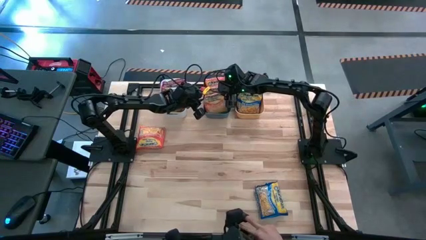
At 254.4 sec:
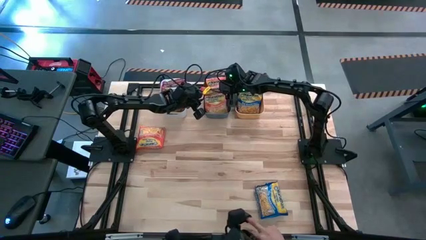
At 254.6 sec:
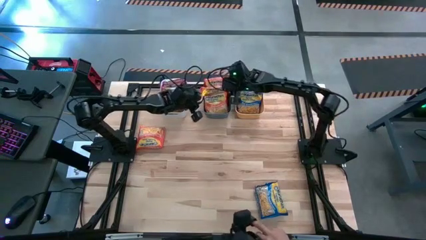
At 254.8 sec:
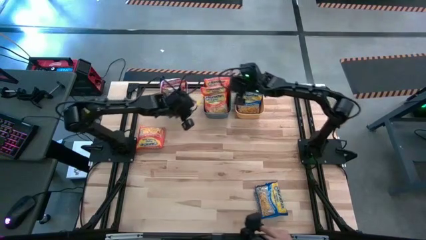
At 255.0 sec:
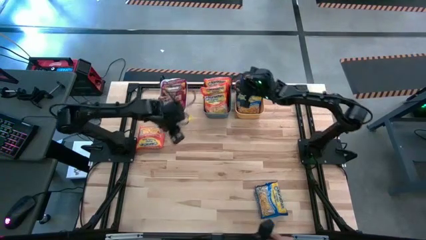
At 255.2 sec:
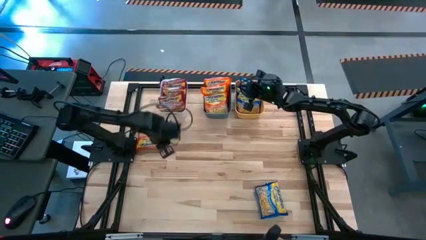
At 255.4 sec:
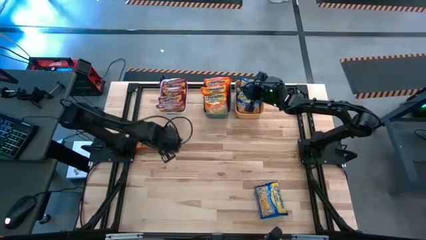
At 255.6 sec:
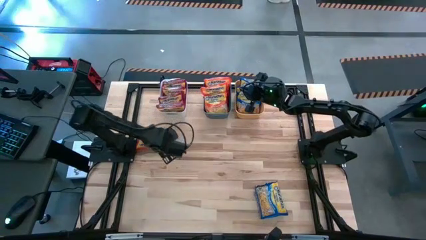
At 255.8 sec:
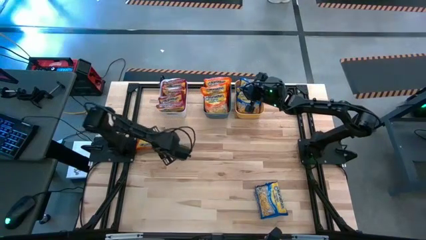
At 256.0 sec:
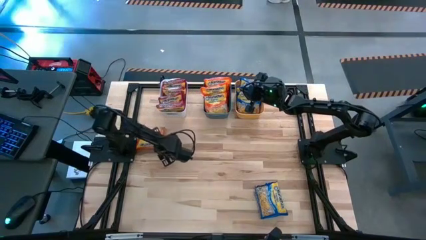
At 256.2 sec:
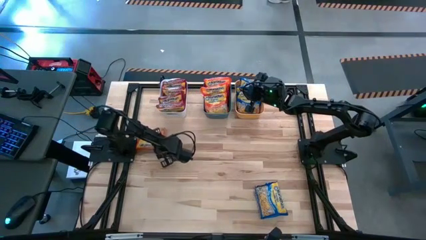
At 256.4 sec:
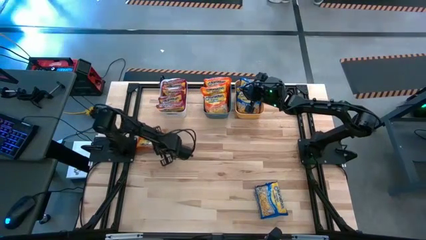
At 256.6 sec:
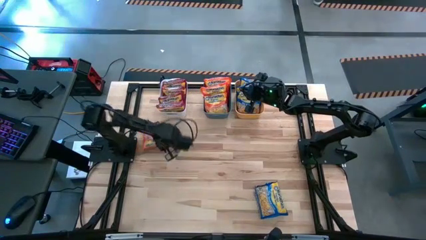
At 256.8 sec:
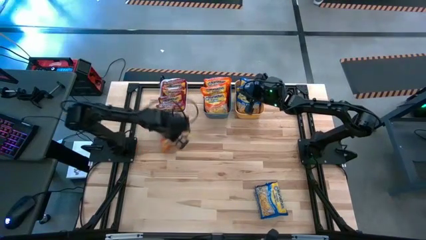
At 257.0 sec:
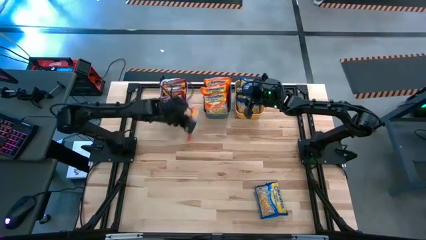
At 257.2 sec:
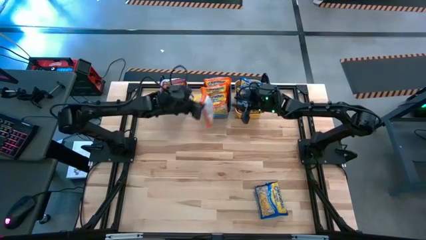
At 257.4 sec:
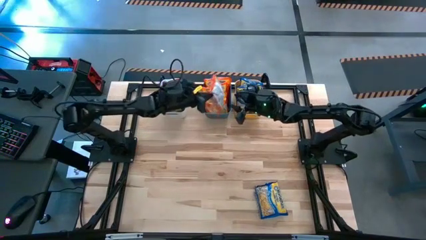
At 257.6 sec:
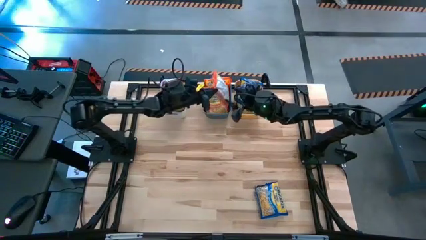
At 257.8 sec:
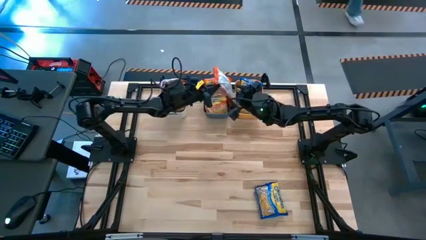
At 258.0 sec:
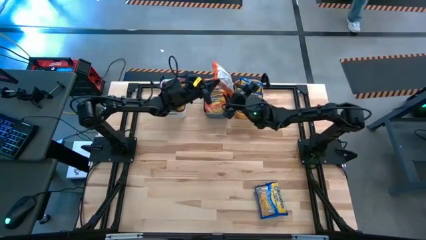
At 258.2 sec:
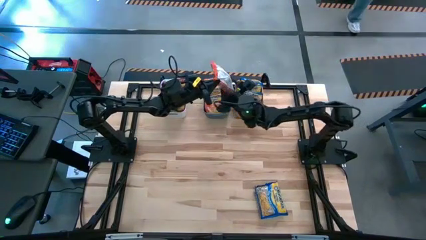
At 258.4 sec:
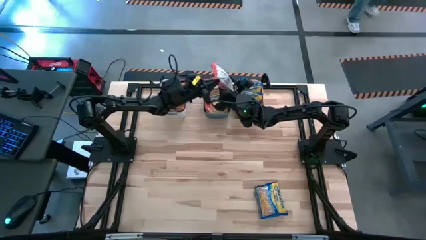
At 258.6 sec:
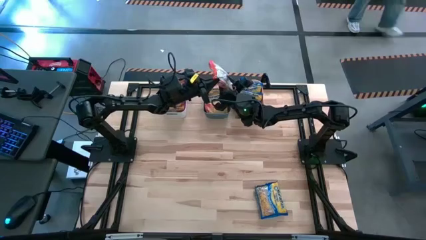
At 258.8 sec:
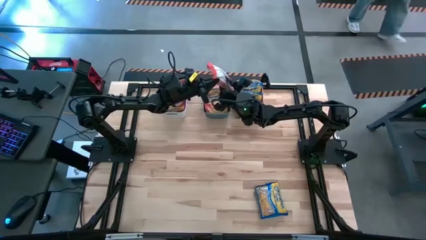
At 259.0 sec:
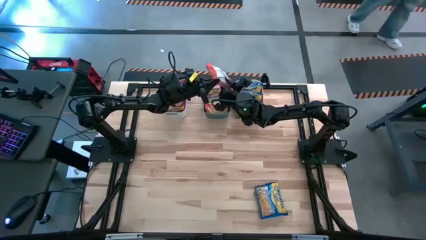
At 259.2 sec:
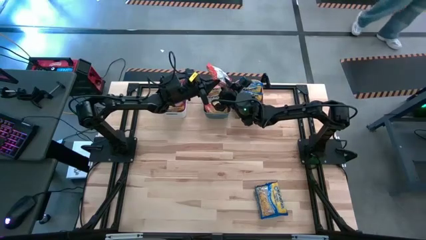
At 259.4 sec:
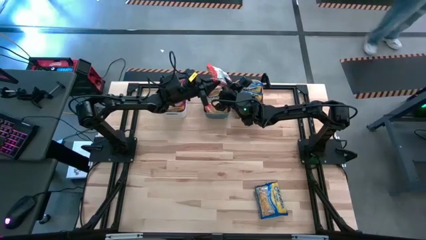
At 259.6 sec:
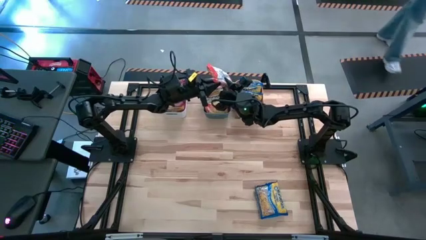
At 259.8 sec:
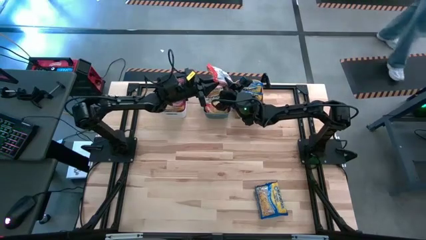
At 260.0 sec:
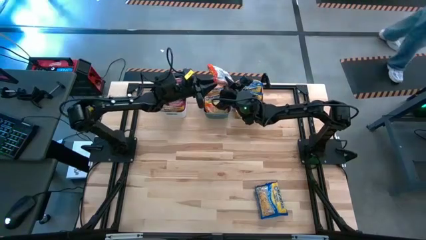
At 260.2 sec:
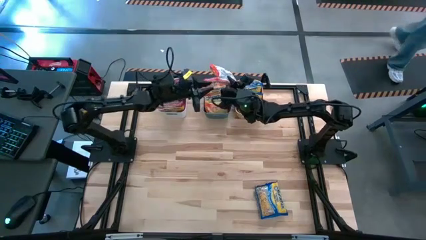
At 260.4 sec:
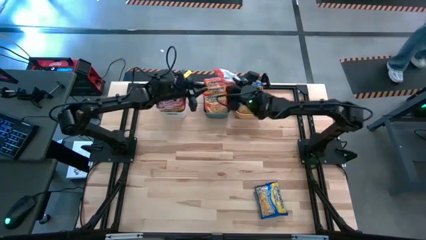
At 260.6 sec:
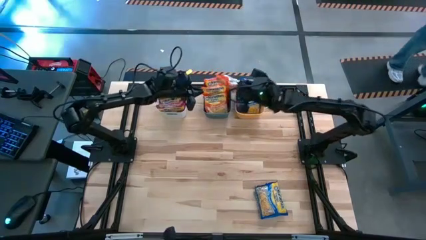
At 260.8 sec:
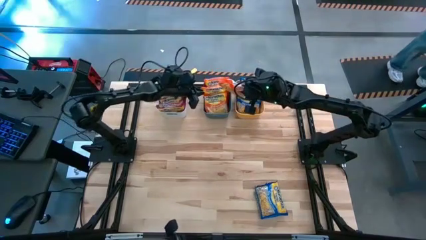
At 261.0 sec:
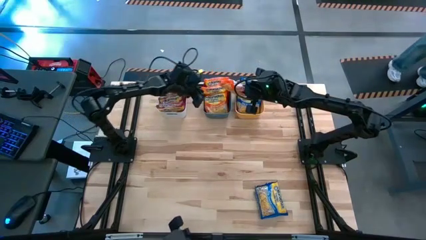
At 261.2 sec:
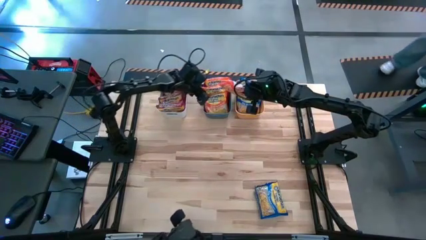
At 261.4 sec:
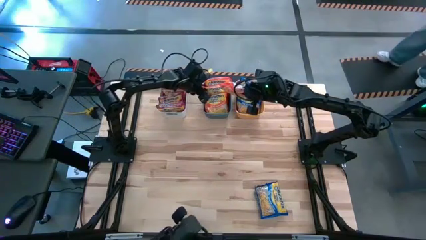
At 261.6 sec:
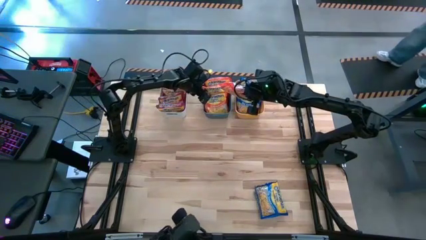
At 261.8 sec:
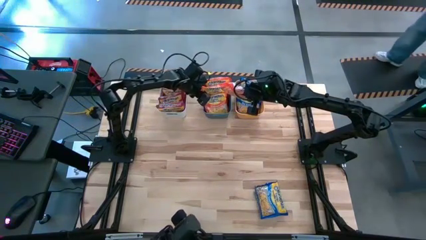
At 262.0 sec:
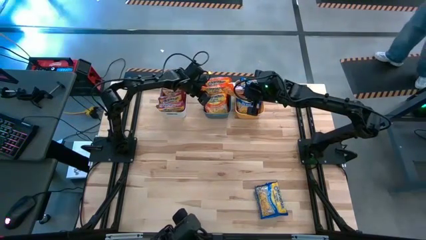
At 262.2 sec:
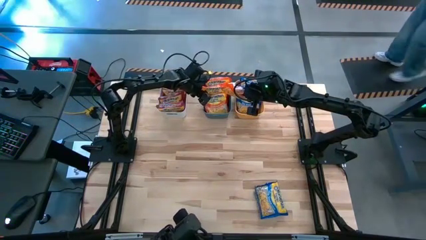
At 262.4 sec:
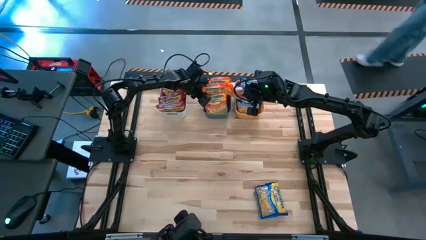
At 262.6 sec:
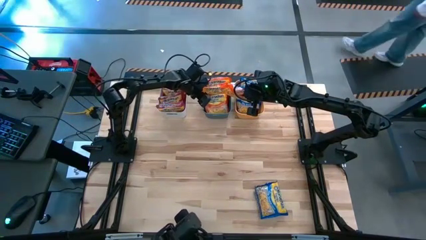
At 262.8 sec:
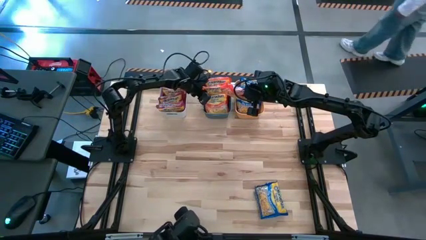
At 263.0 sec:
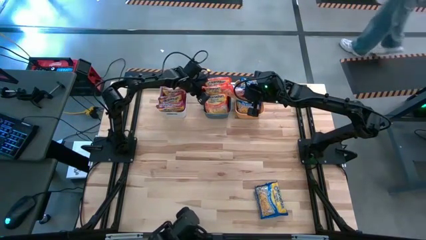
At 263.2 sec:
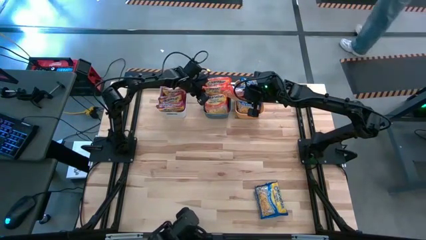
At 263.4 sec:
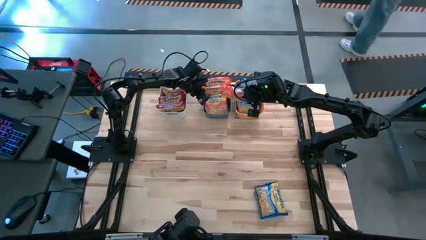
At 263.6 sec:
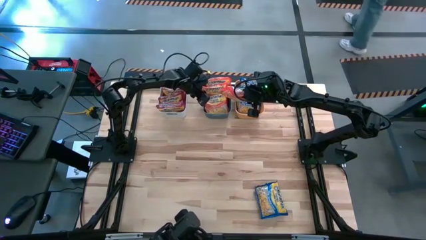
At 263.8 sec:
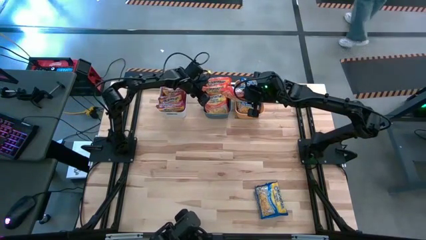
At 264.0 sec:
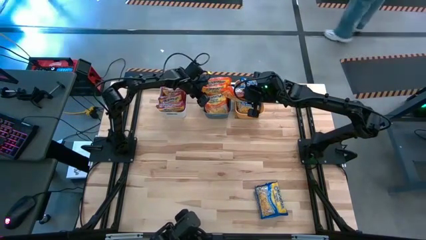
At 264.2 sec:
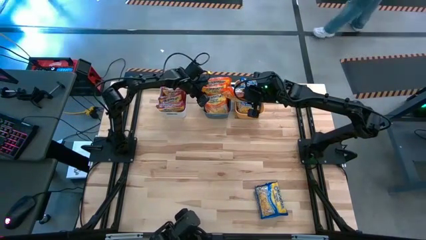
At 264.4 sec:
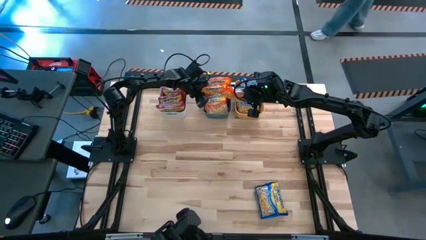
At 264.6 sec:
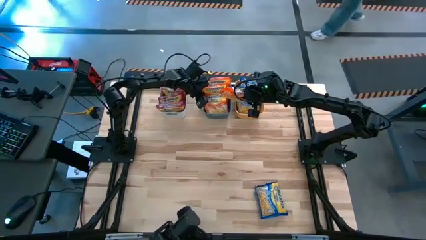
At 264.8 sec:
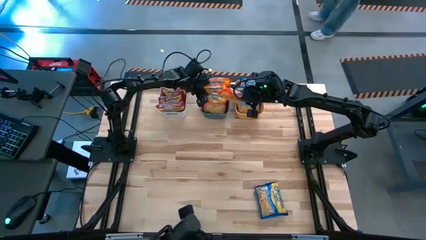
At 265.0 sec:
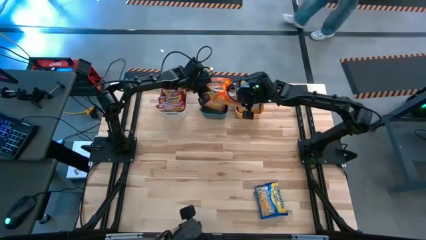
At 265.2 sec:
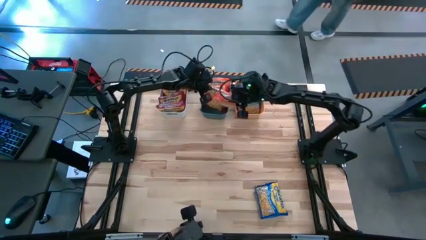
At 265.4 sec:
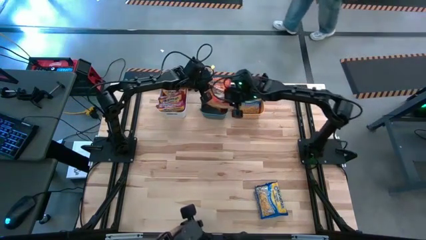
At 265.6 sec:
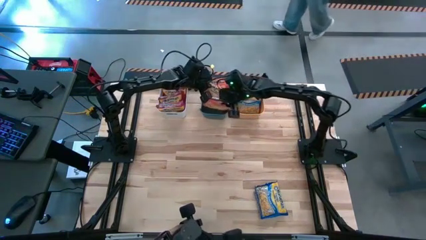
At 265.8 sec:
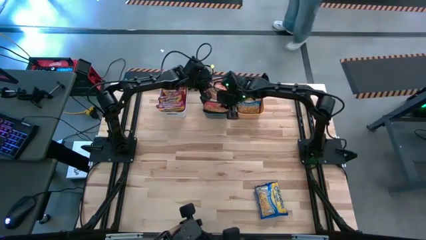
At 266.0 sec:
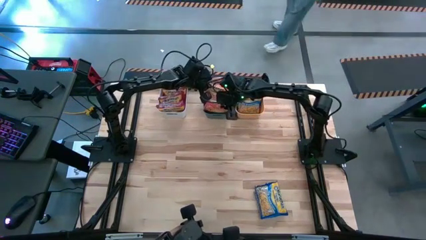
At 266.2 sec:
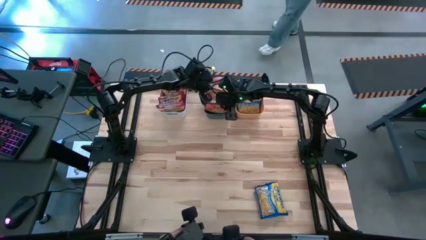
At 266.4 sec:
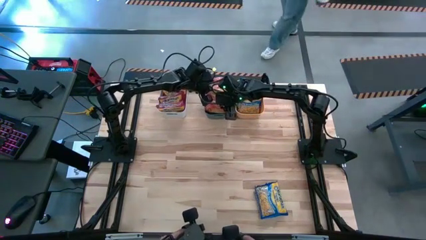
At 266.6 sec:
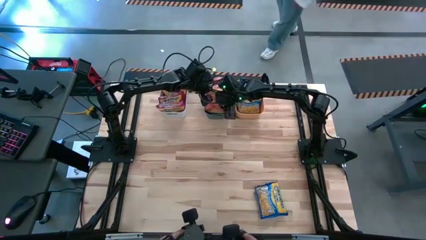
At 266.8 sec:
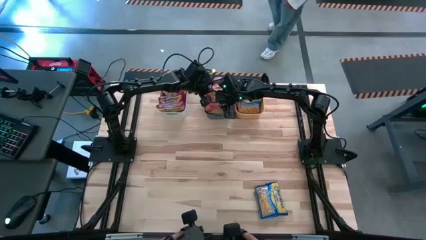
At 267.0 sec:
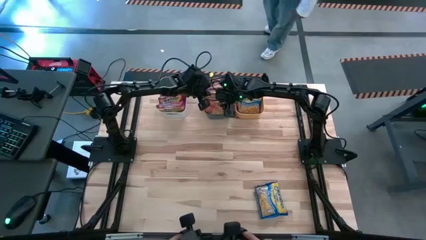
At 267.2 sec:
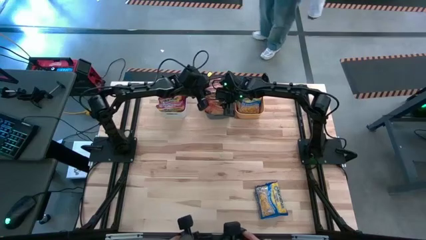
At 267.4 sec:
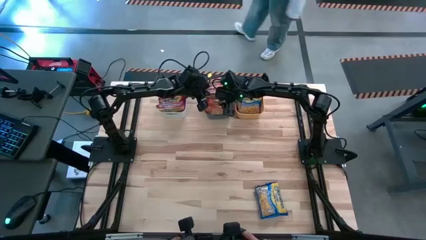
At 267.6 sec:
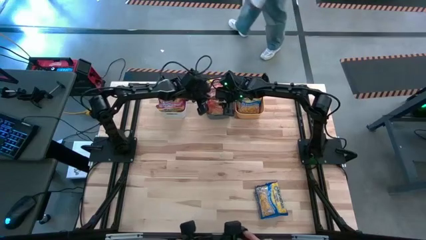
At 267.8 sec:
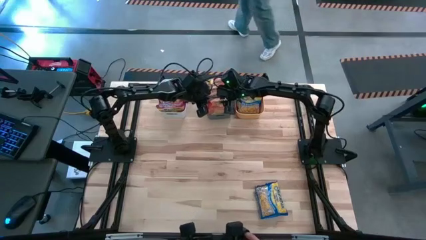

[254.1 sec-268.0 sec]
Task: Sort Maruchan noodles
Put the orange noodle pack into the blue bin

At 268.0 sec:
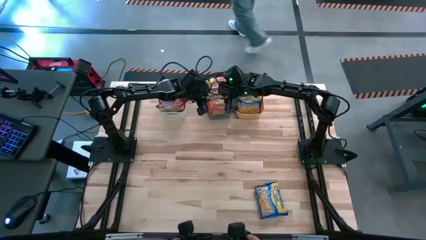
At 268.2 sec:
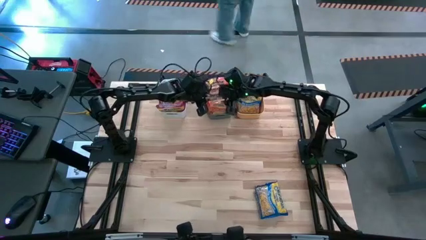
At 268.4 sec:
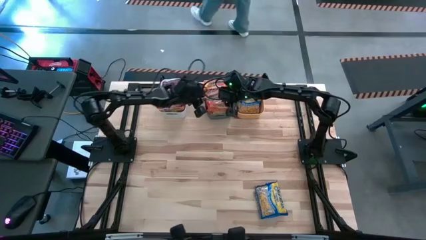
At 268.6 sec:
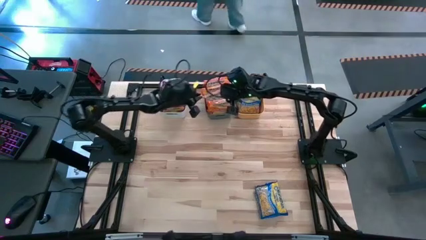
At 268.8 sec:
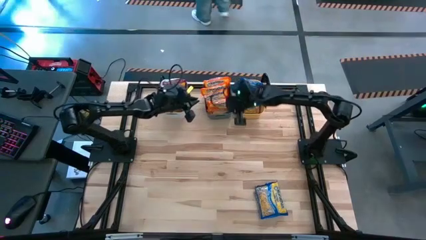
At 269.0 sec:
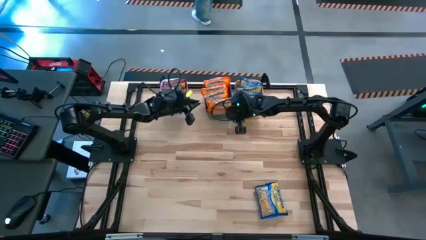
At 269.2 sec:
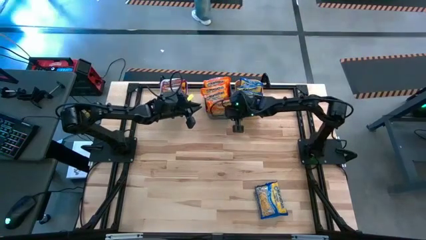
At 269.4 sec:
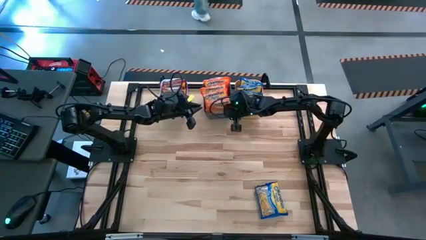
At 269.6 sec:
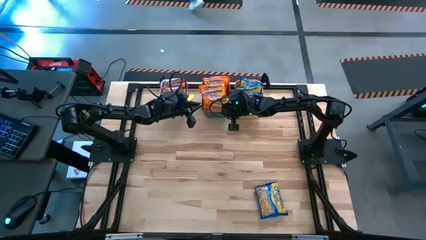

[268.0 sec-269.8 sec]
Adjust the blue bin
